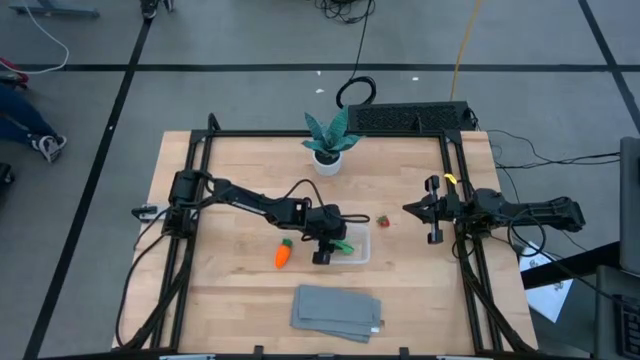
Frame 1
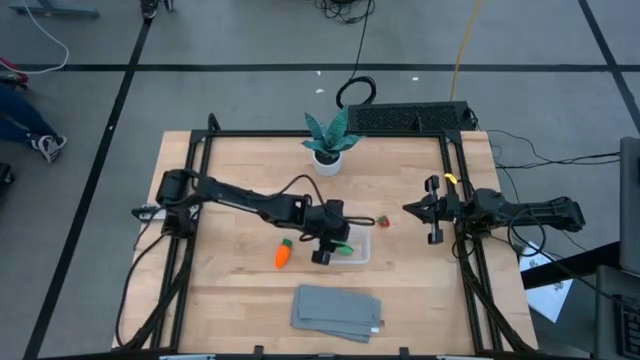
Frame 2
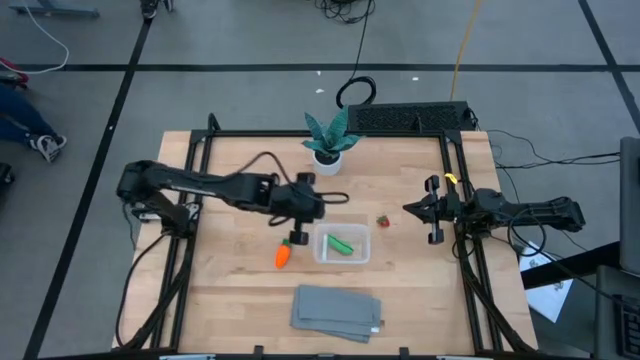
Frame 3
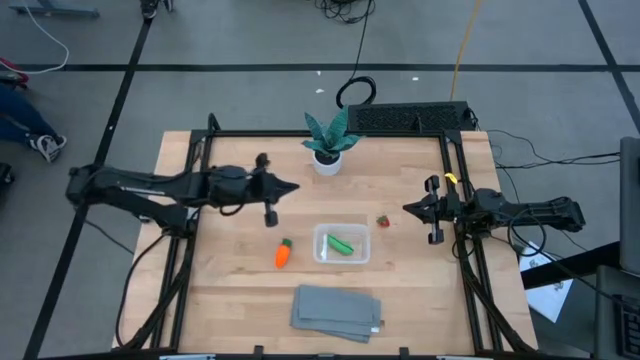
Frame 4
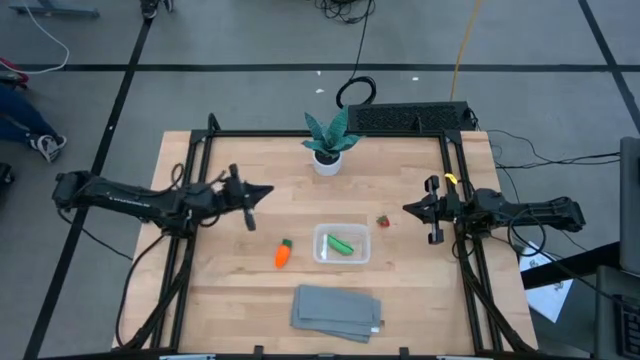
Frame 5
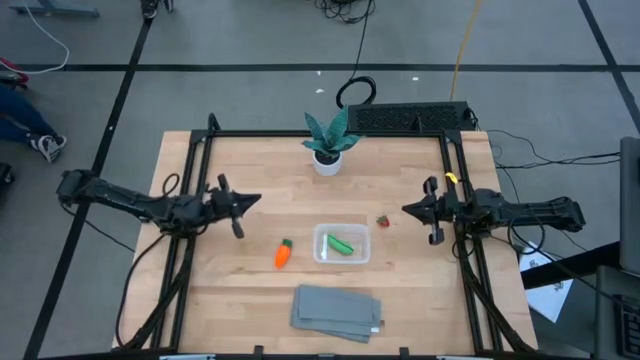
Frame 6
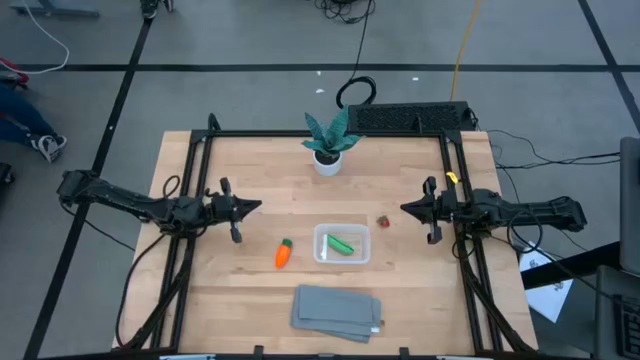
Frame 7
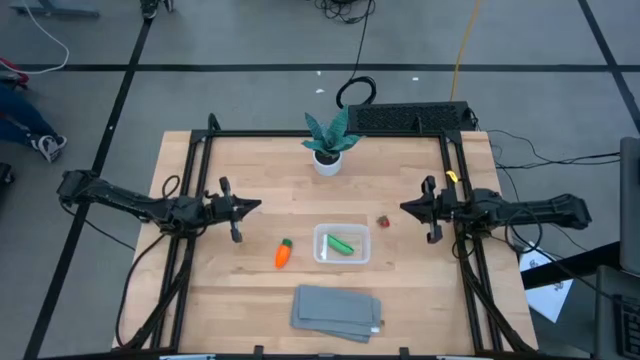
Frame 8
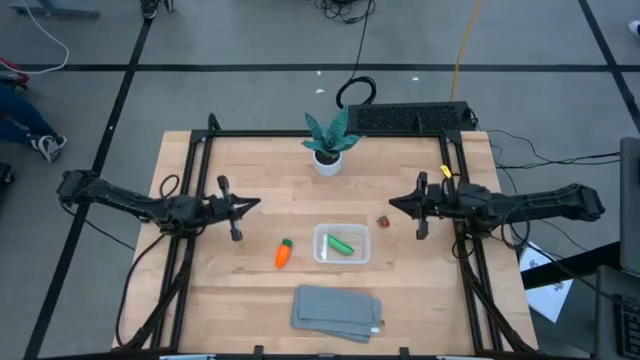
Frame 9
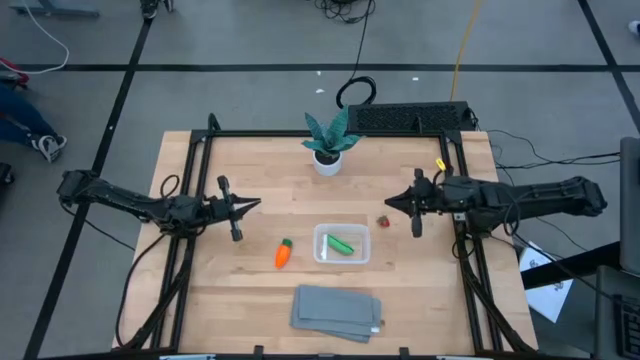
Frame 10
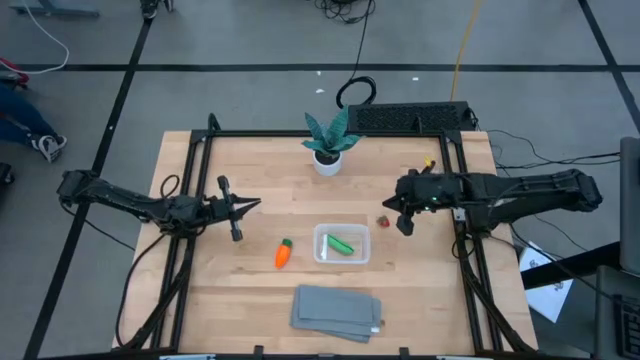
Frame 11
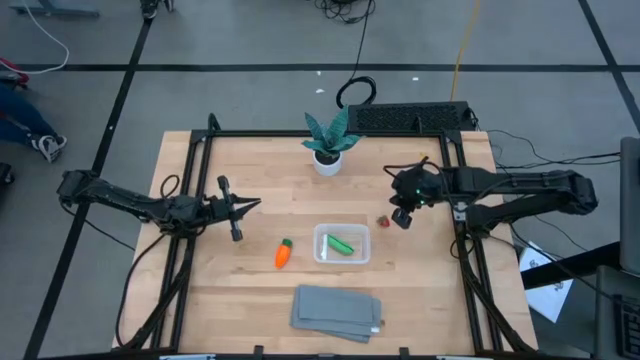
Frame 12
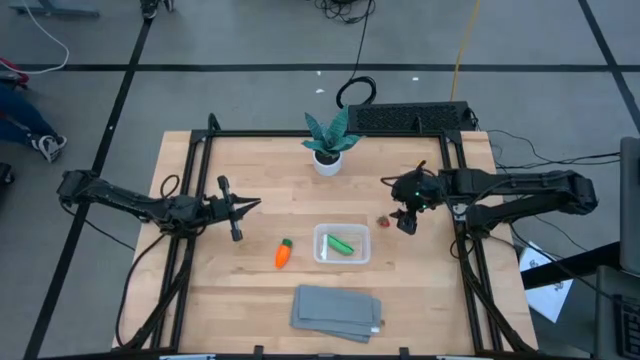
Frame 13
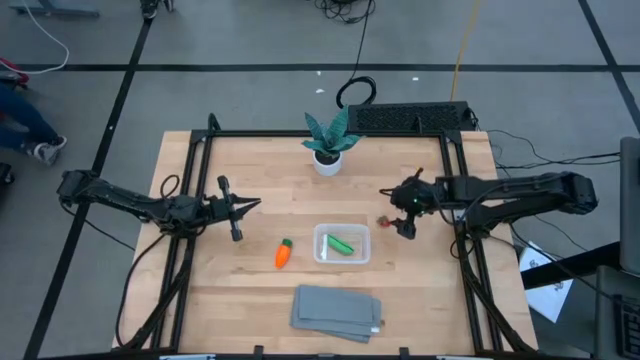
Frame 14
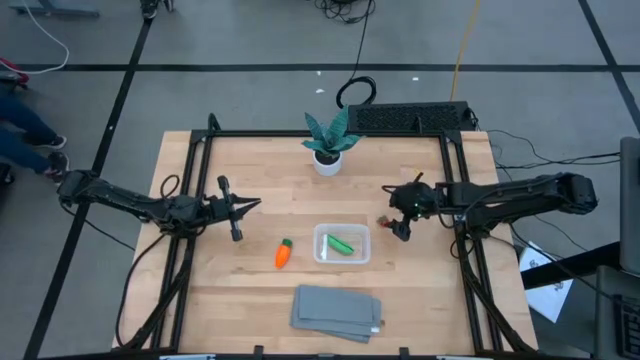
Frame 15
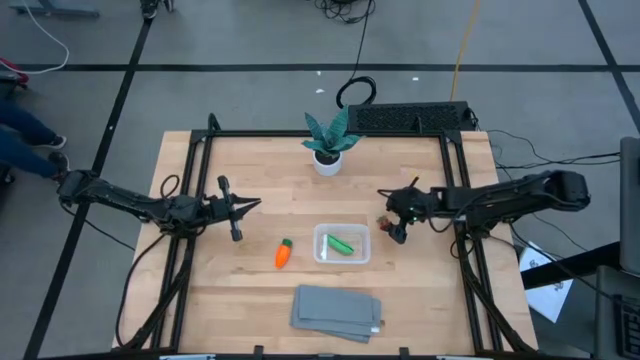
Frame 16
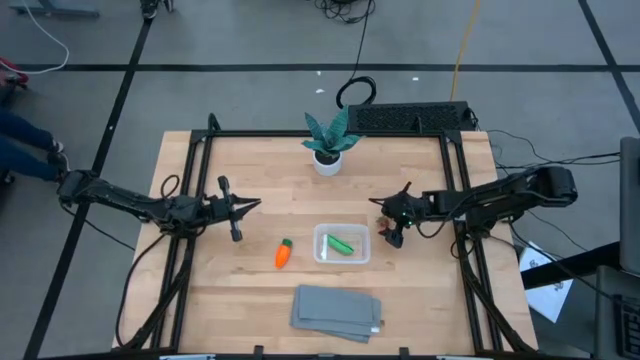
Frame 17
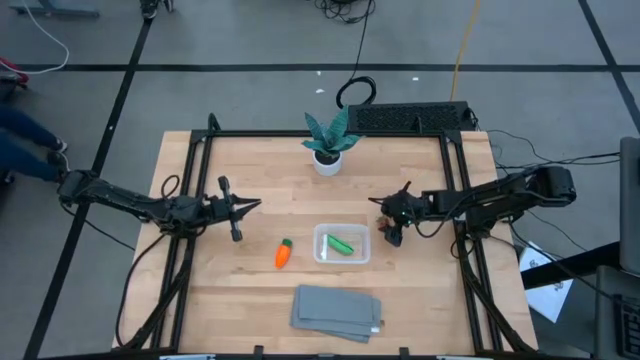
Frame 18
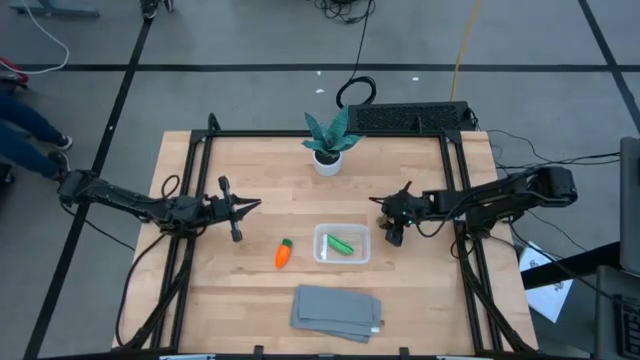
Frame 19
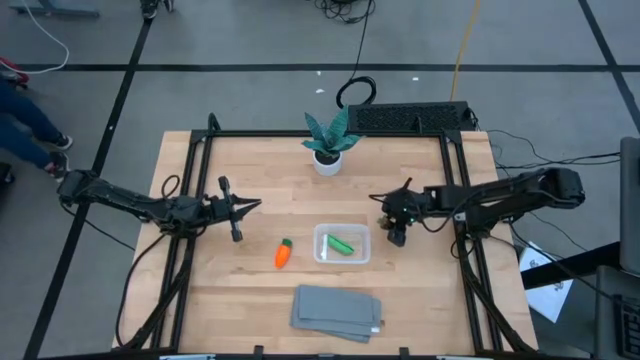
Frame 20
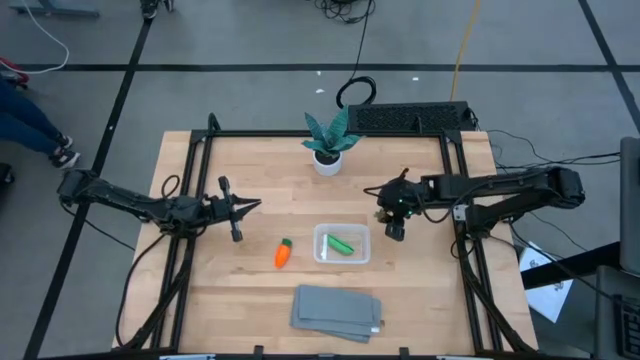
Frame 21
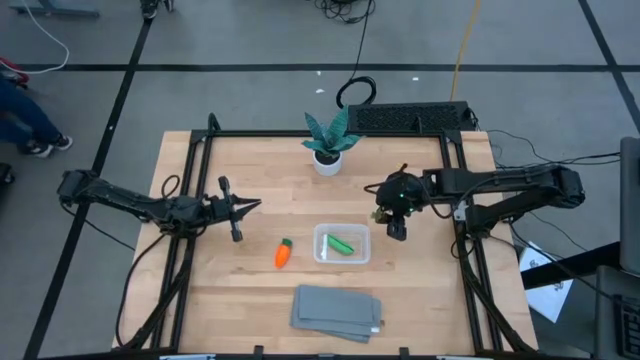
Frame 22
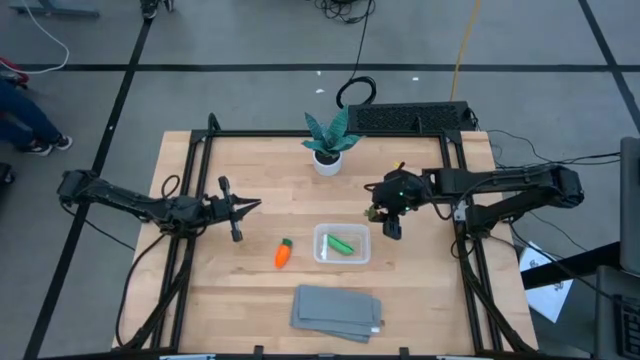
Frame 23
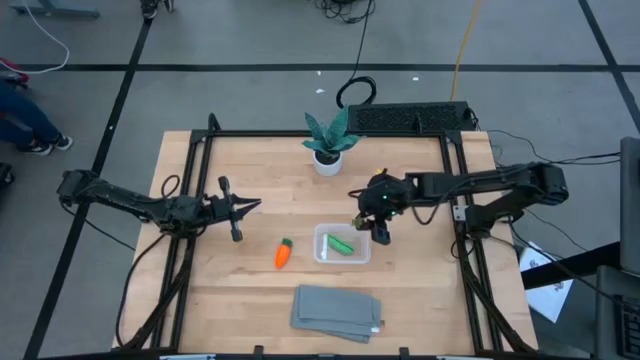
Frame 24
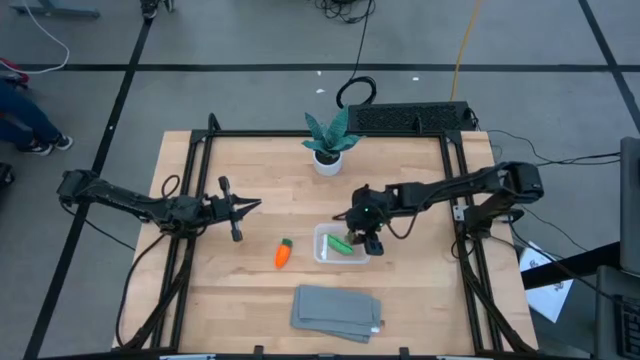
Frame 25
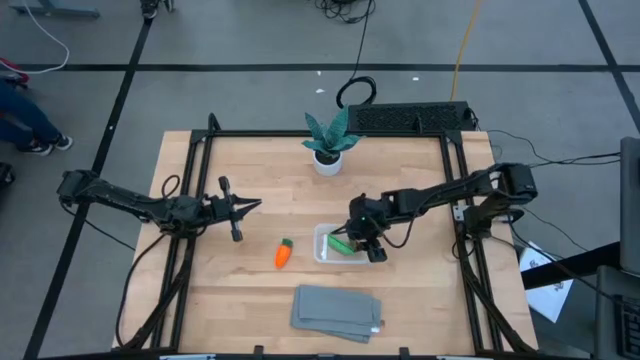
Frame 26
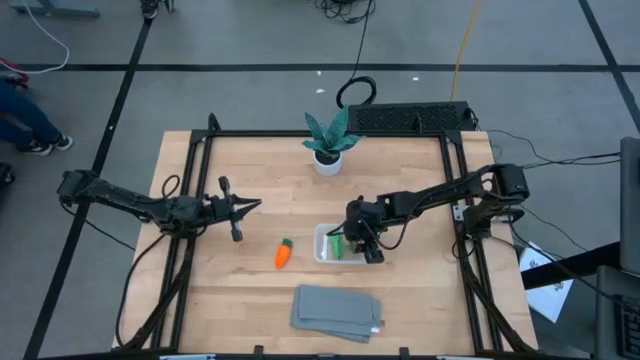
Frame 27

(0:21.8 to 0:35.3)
Task: Pick and placing Produce into tupperware
Put the red strawberry into the transparent container

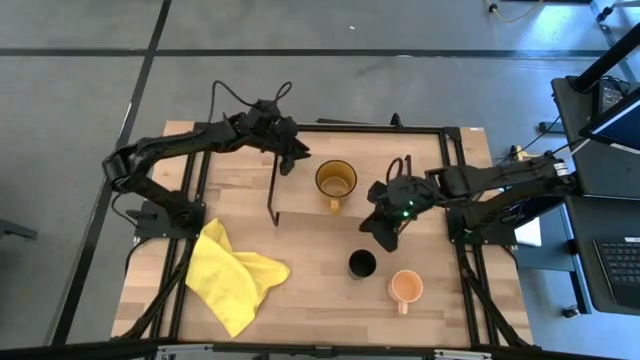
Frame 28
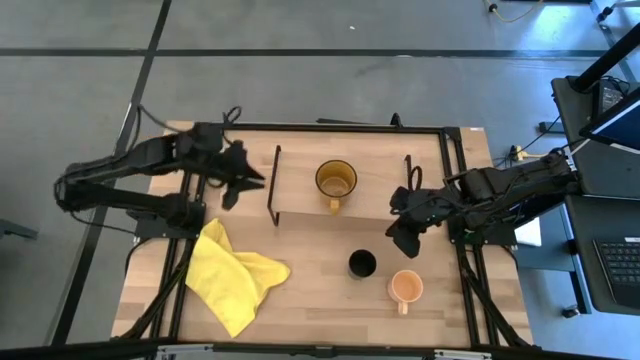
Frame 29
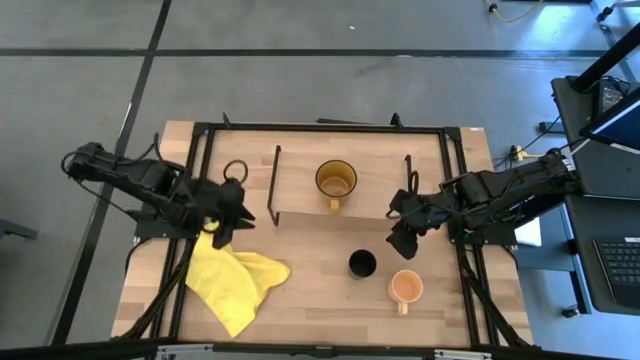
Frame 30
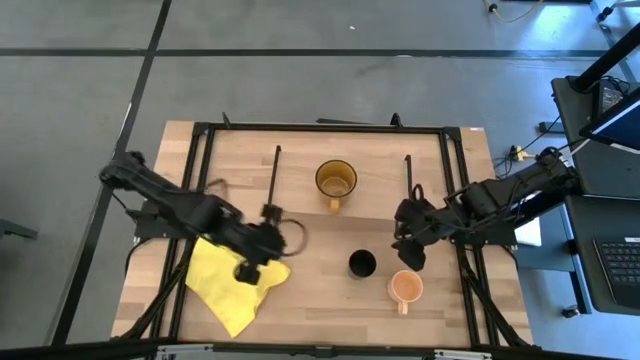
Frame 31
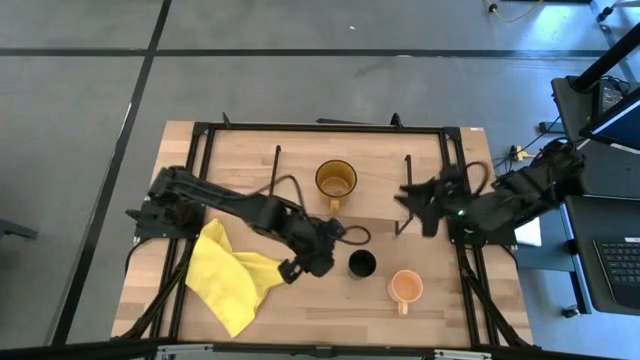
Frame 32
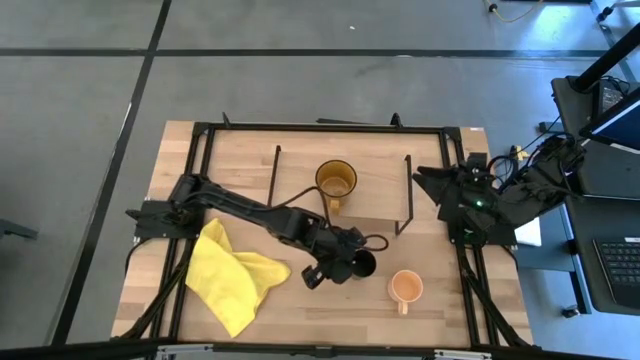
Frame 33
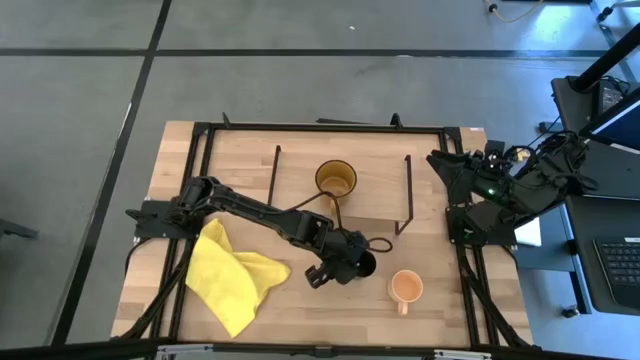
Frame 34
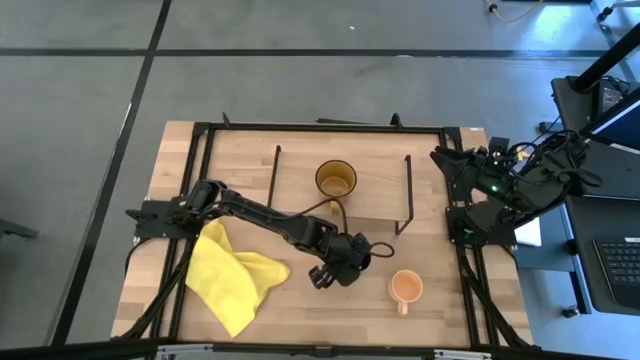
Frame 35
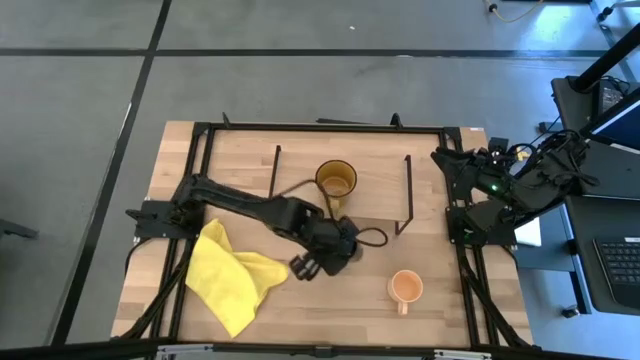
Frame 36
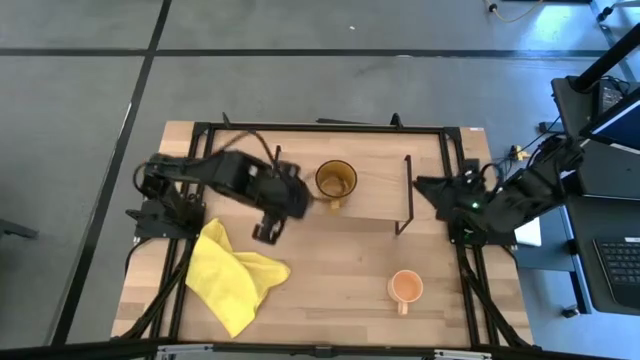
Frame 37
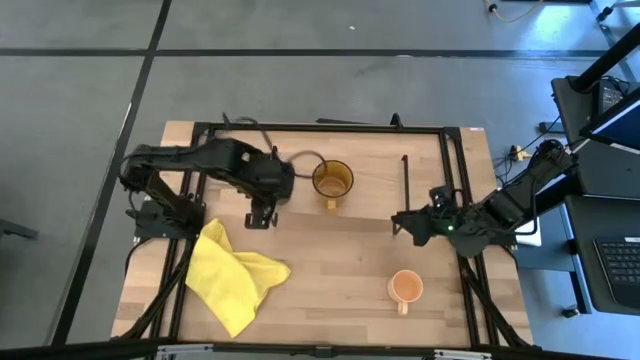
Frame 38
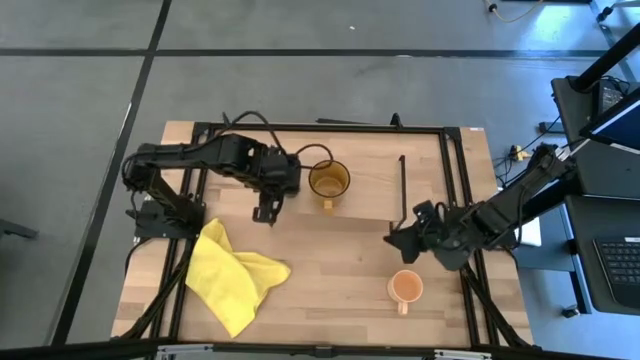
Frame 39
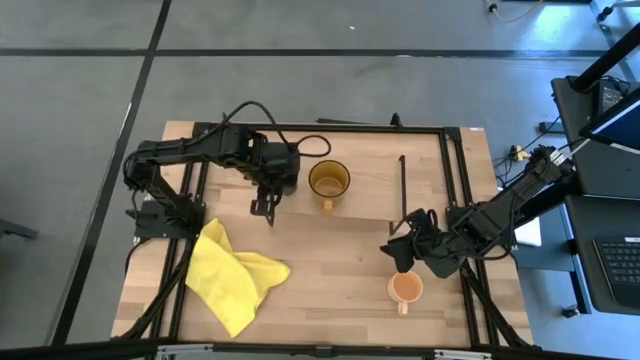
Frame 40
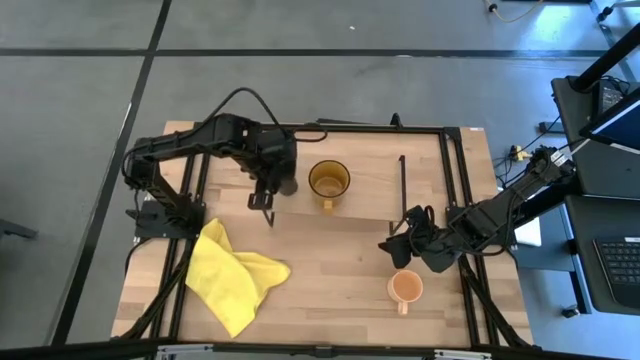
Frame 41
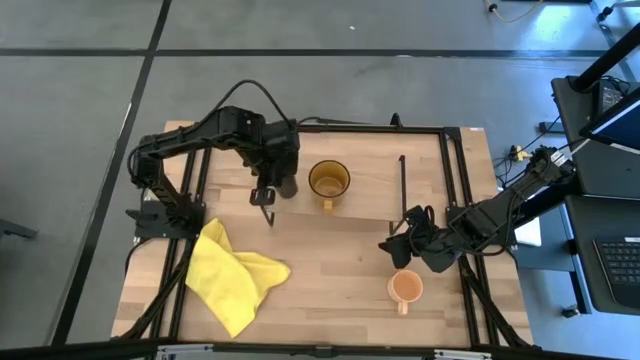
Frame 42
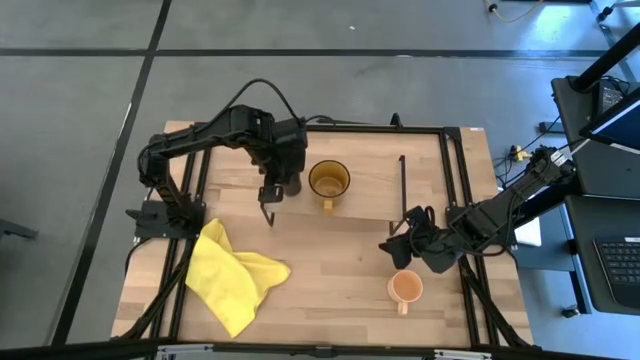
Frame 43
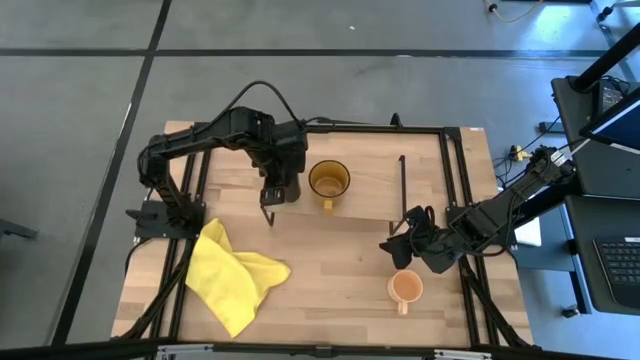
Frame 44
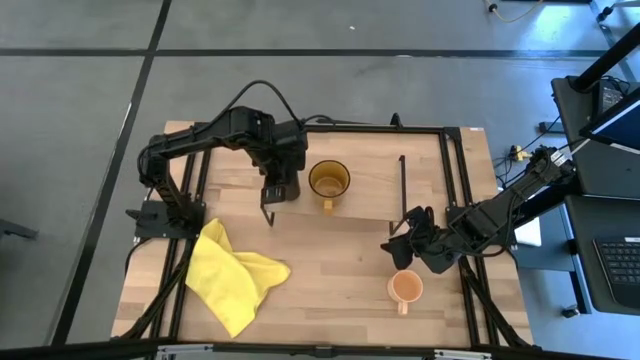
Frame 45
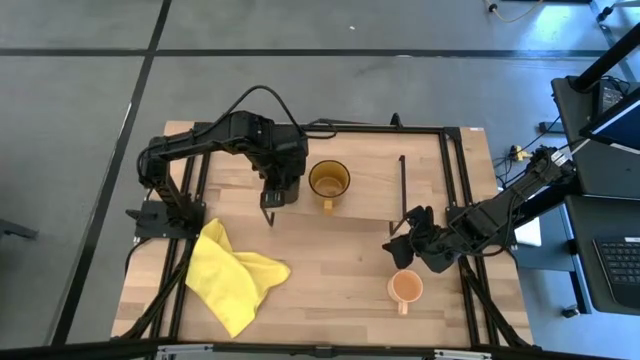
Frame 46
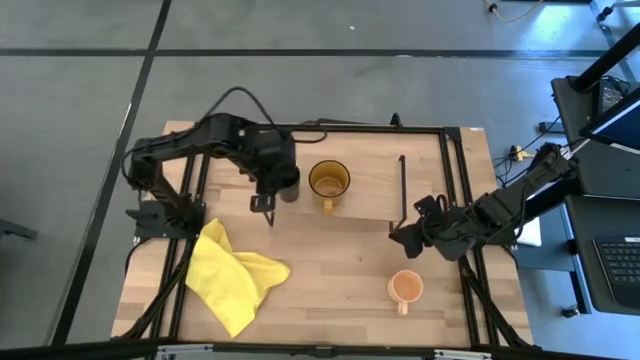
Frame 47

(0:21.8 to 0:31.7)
Task: Stack small to large cups/mugs on shelf
Put the black cup on the shelf
